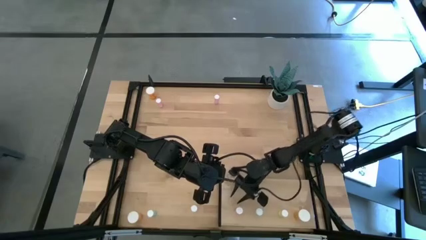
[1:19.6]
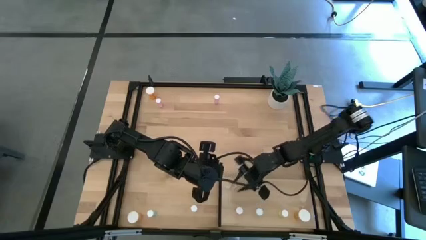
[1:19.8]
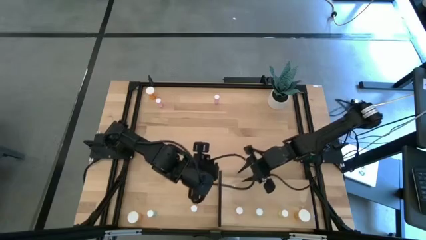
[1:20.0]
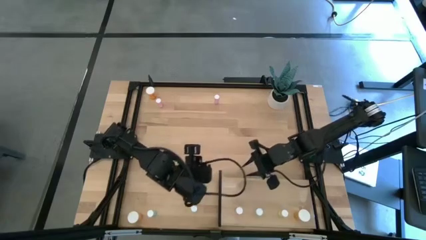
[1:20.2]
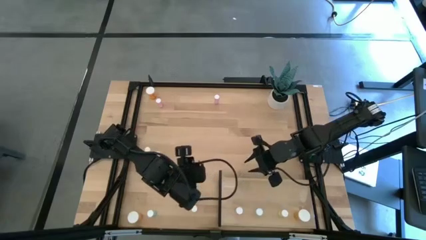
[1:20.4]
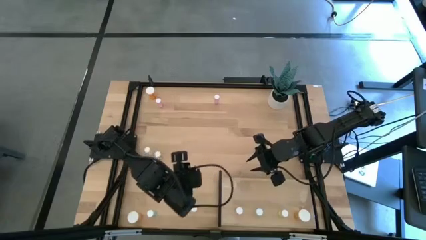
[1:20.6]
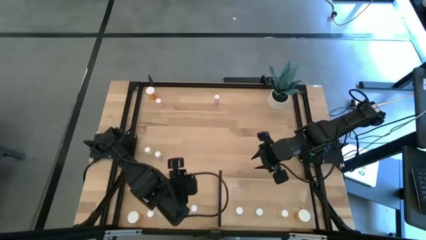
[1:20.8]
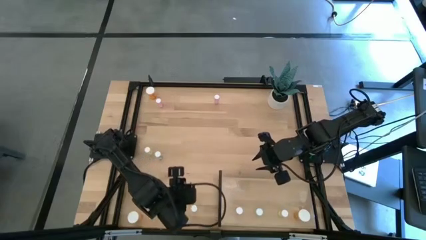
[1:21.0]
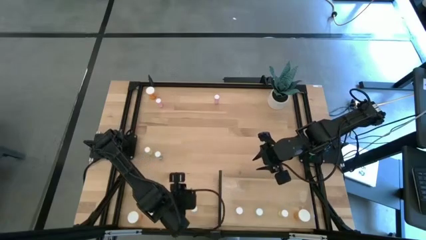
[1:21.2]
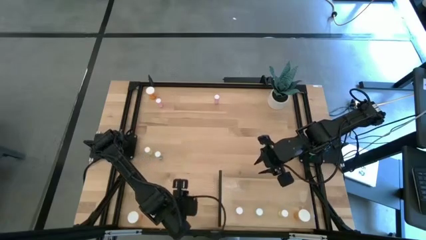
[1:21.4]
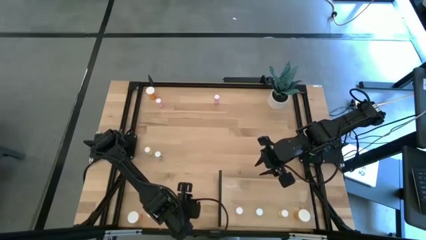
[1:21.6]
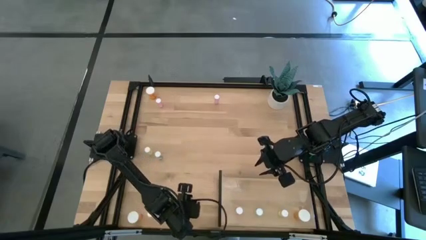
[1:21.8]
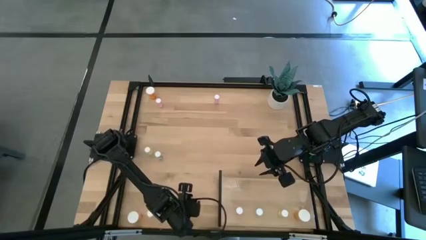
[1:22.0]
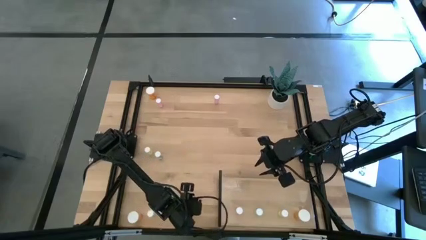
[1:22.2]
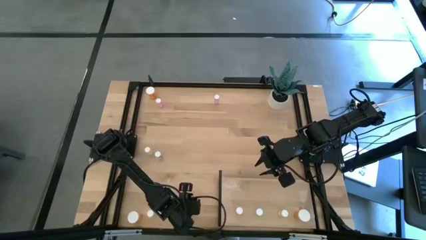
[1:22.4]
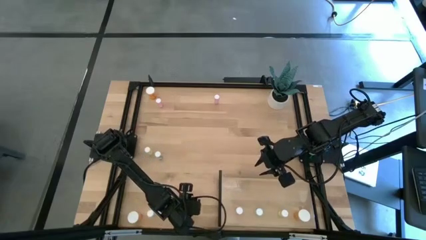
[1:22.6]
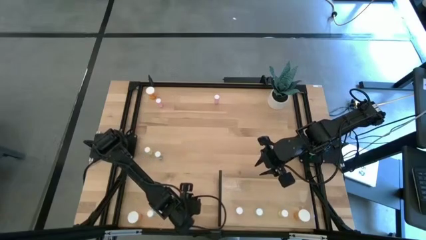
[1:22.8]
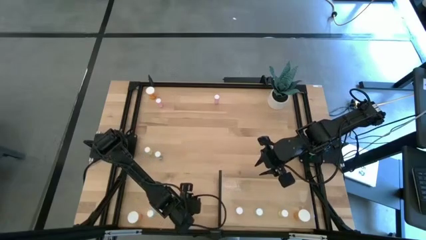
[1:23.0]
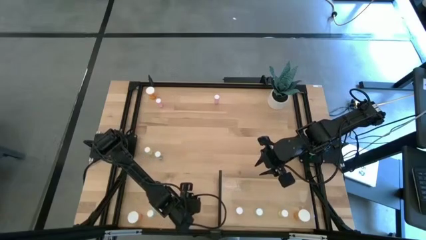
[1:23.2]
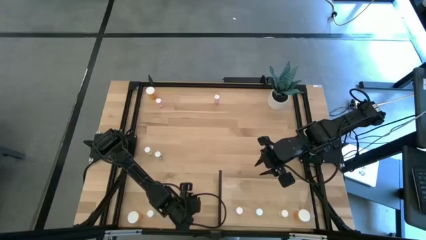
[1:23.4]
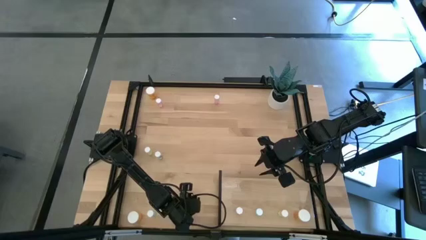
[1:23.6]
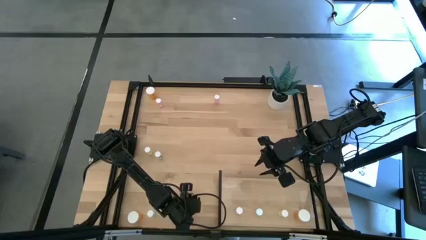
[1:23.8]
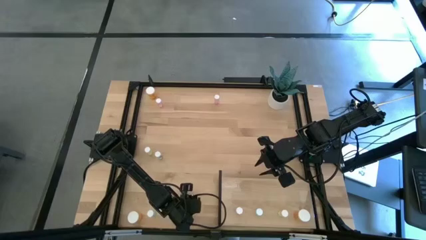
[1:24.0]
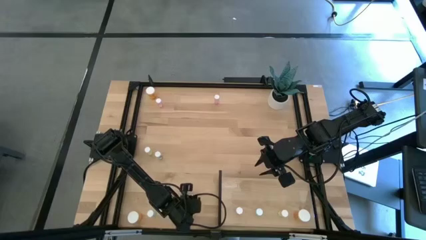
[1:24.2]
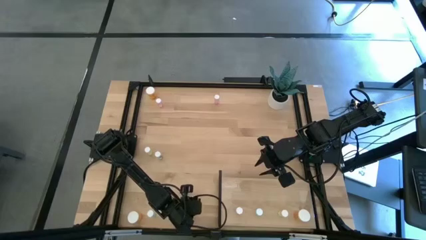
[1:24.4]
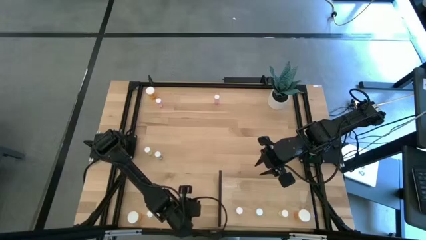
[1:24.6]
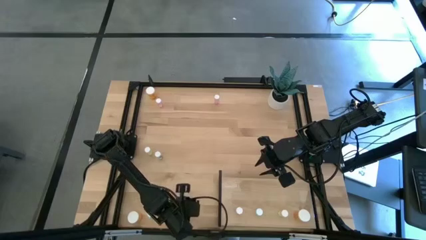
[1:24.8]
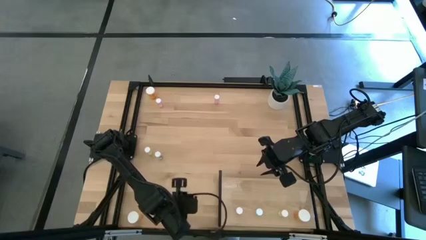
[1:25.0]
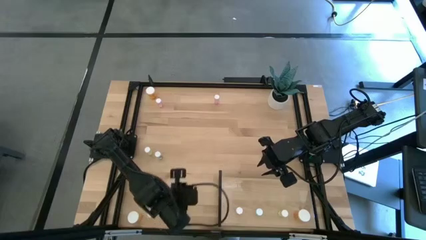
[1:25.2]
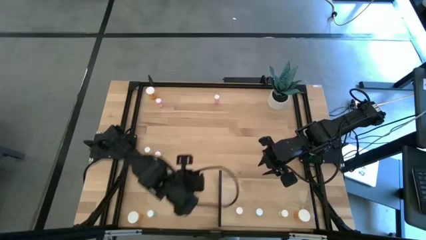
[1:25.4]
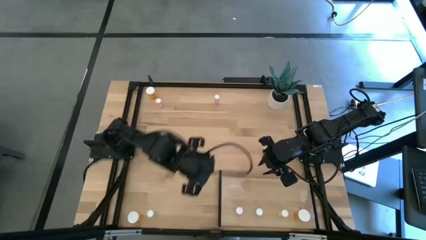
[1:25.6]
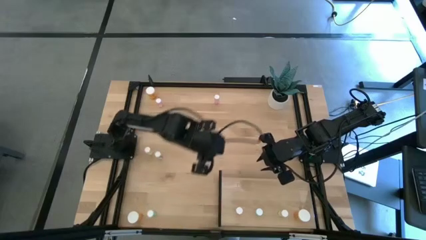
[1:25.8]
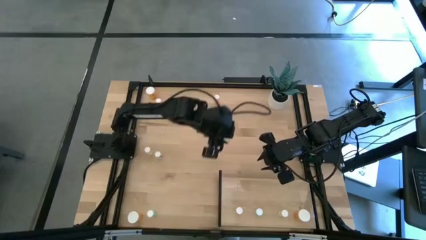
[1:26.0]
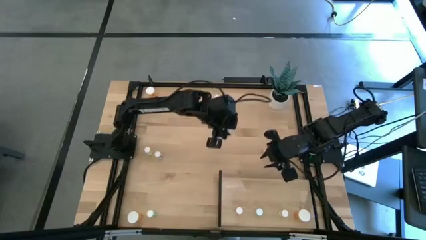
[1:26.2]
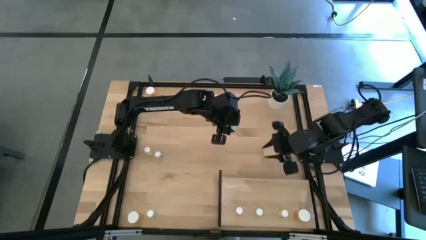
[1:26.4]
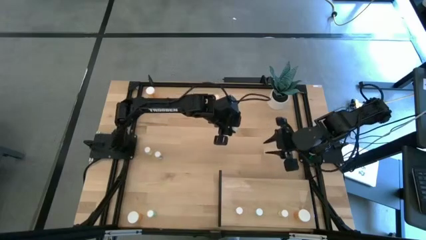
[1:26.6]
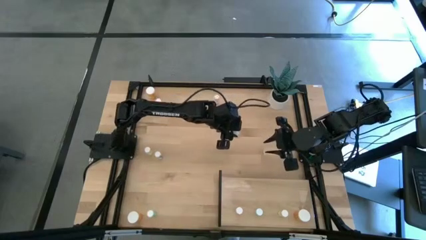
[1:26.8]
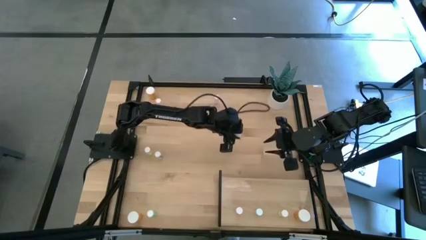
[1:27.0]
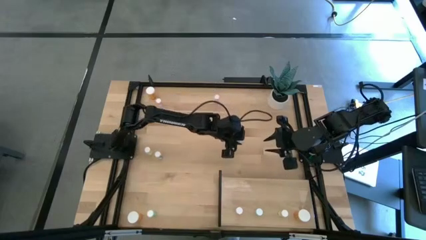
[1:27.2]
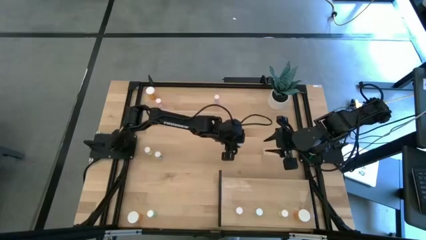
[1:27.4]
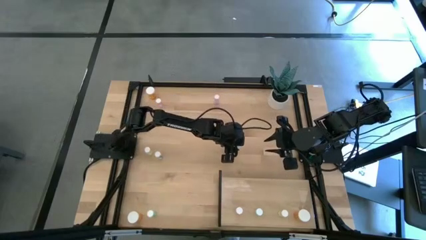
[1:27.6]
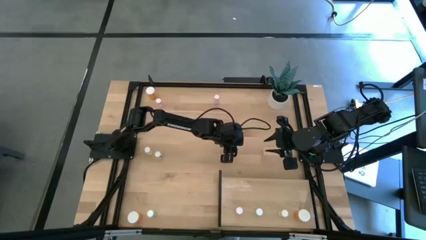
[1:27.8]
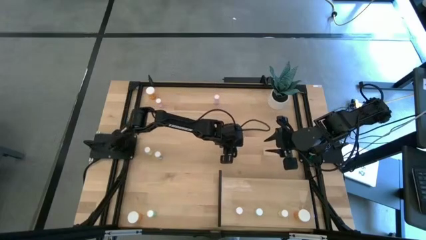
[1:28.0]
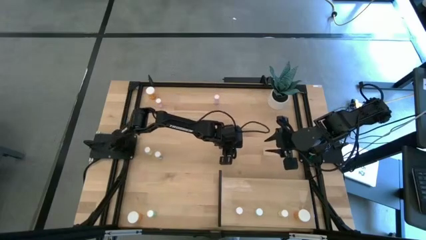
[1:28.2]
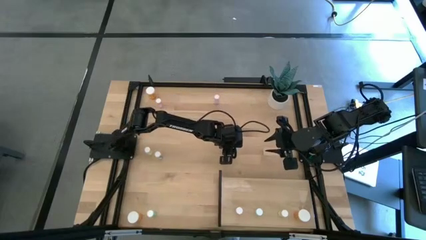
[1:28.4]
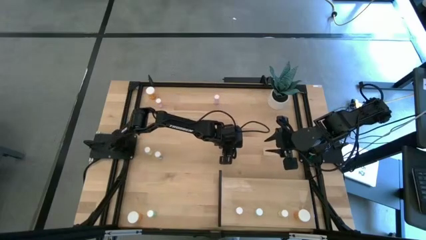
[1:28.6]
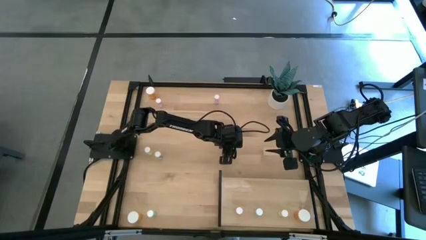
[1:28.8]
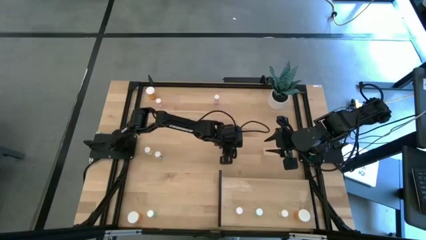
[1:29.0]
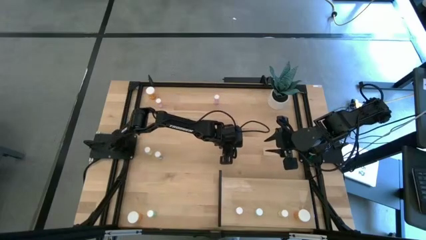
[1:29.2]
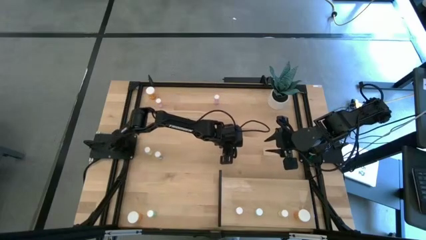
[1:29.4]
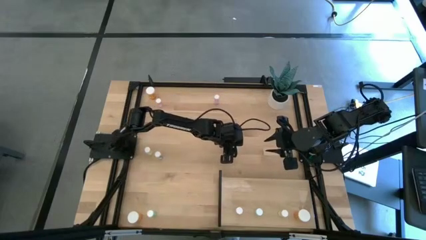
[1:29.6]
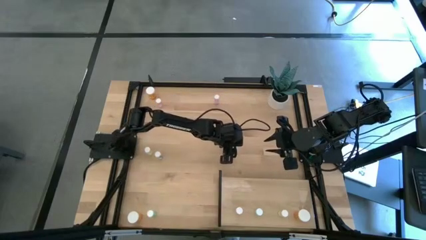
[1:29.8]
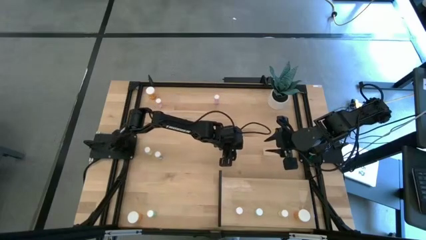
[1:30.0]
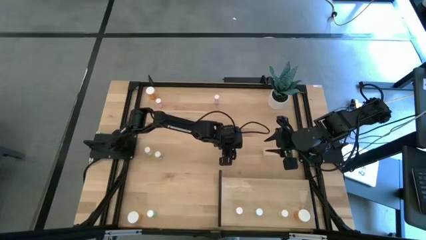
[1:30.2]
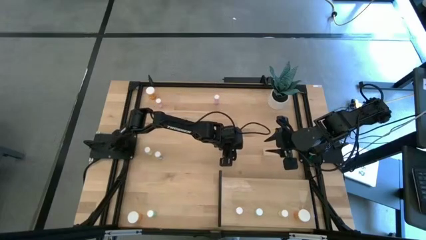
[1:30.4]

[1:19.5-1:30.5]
Task: Pick and place medicine bottles onto shelf by color
Put the bottom yellow pill bottle on the shelf aligned with the other yellow pill bottle

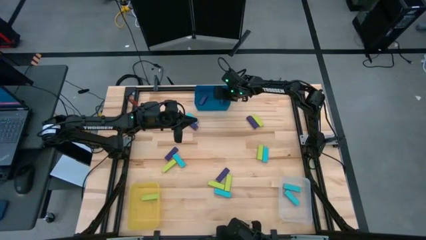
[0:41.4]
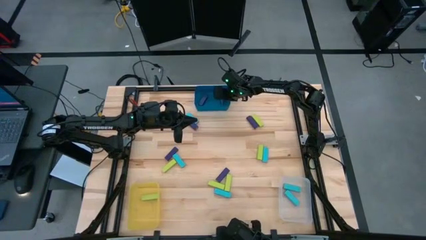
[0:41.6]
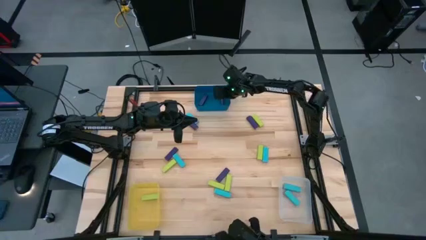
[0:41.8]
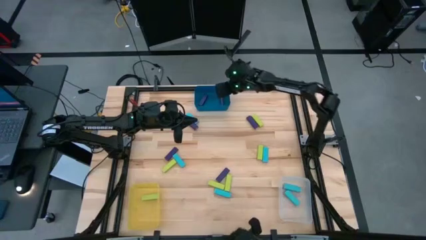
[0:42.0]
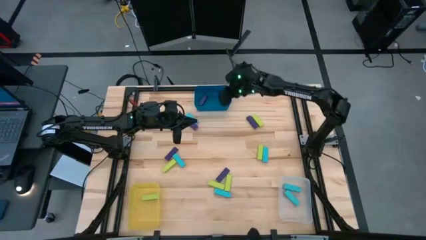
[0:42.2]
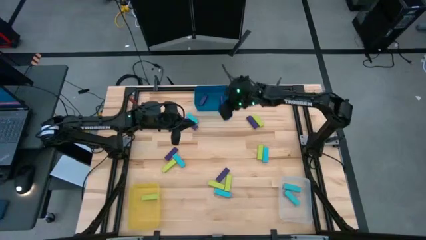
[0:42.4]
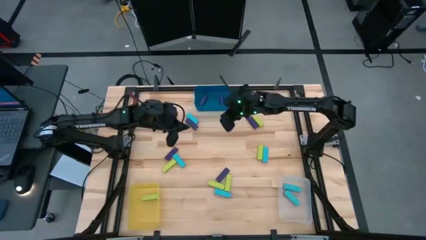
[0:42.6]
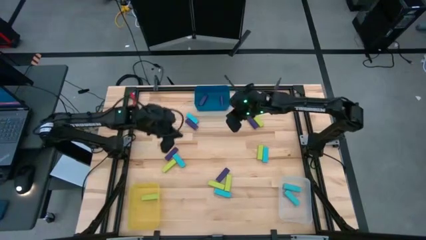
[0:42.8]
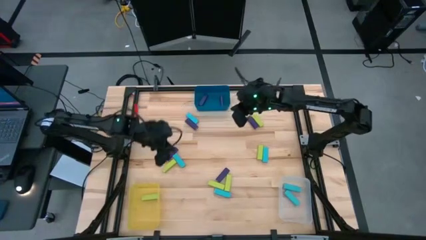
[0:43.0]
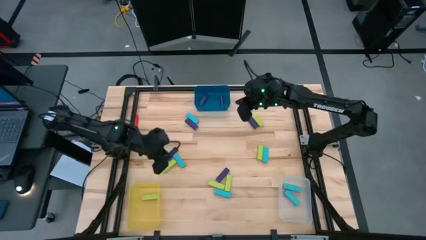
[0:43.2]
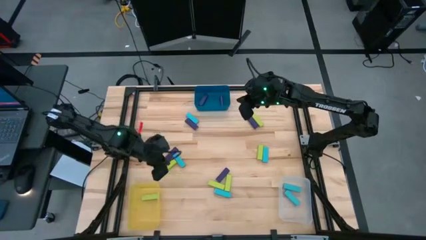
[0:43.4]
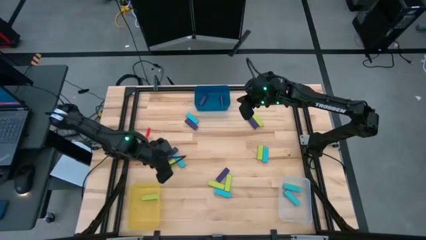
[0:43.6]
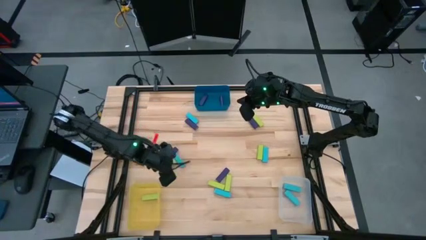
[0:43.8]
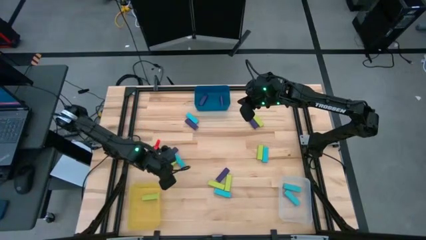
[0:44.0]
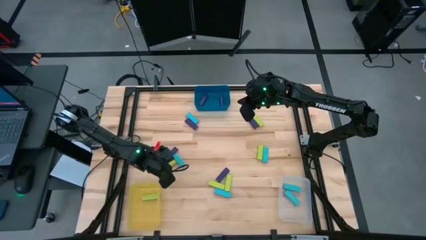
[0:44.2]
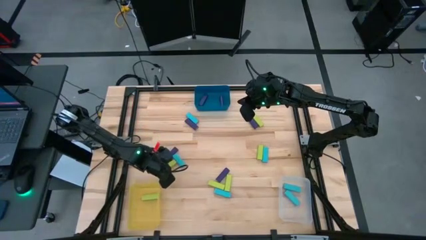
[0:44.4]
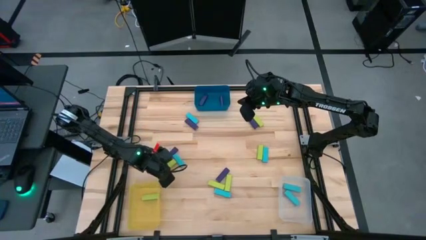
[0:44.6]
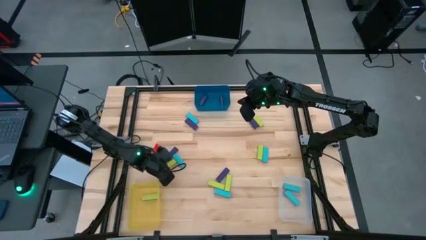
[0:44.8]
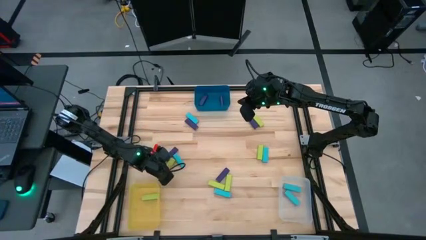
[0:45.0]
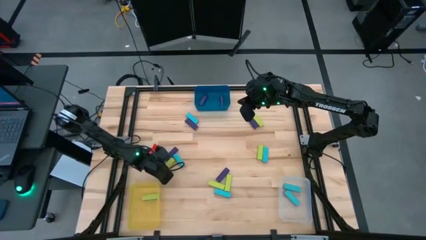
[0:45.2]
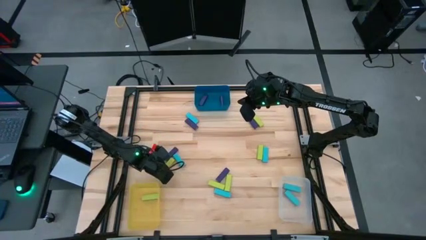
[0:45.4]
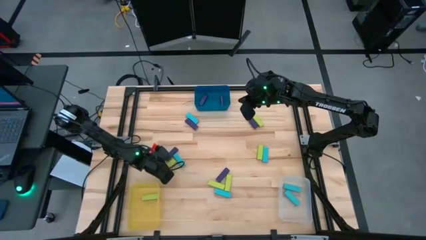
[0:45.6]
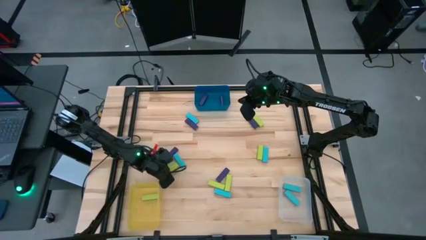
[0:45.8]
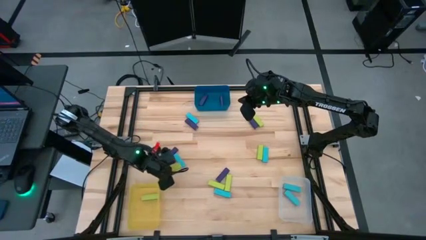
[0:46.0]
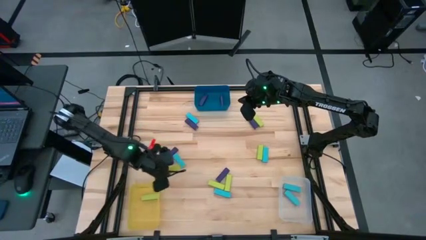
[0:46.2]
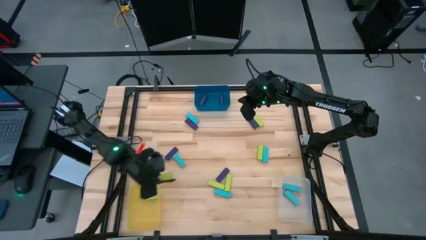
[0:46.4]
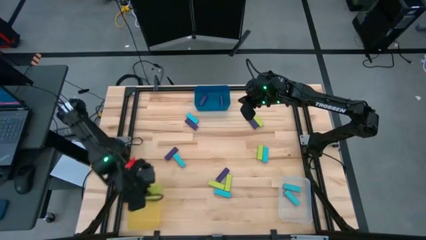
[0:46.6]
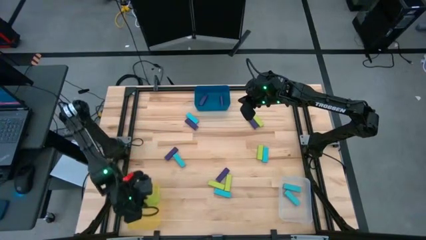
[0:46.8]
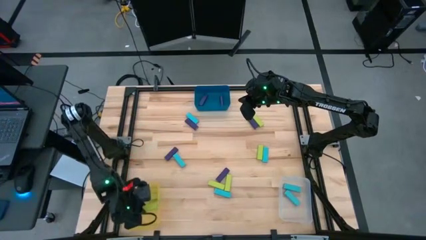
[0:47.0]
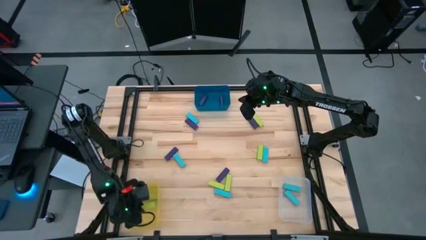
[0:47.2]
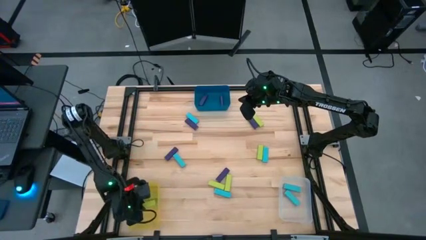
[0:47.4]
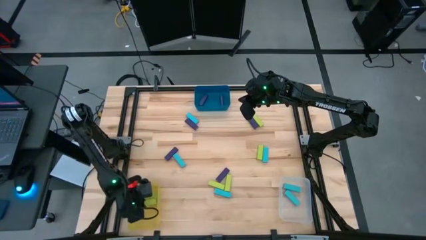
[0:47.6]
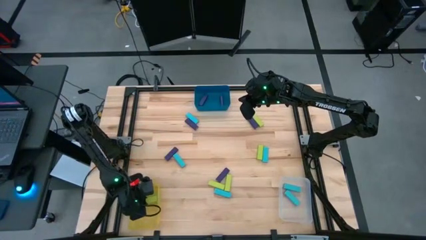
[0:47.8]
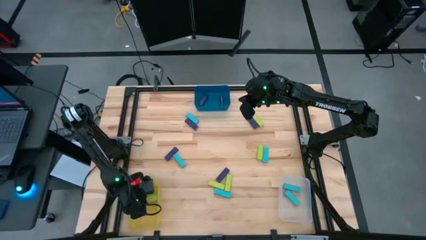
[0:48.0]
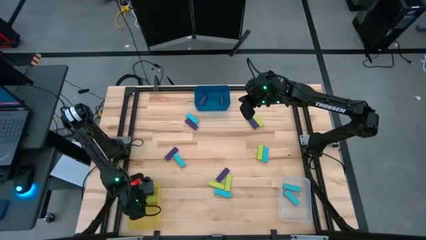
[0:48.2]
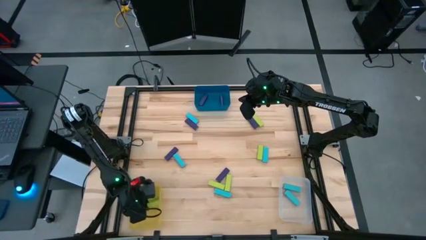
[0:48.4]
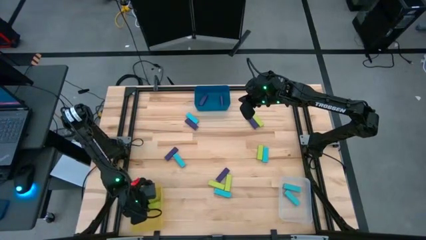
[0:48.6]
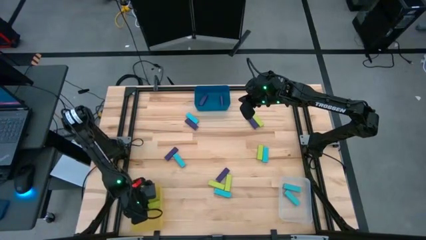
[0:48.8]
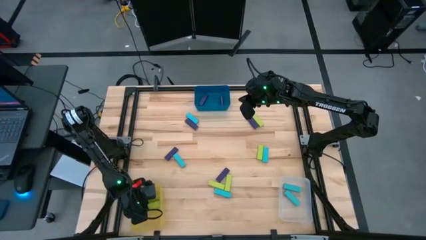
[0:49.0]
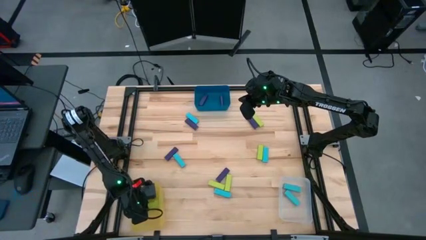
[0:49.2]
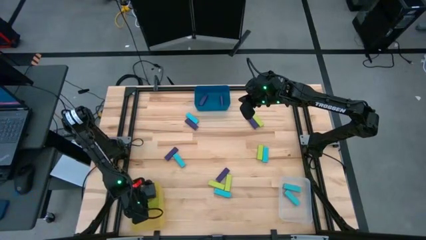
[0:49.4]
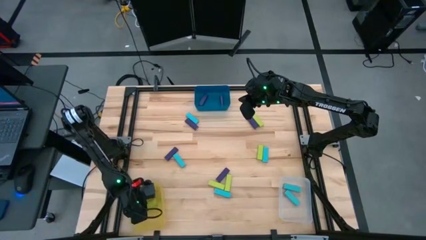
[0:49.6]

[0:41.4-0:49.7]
Task: Sort blocks
Put the yellow green block into the yellow bin
